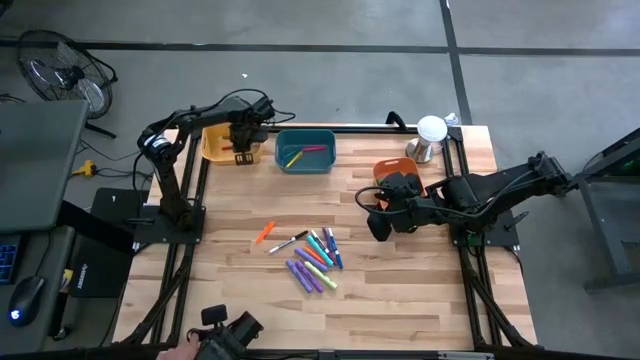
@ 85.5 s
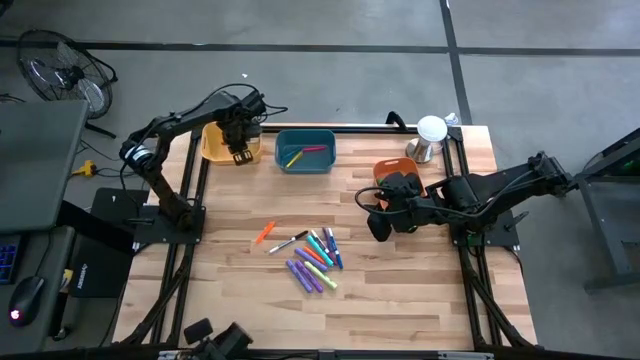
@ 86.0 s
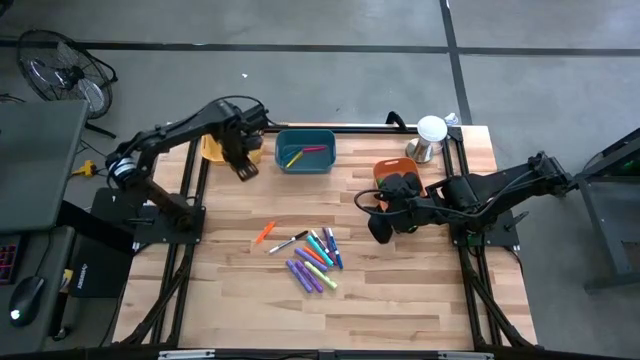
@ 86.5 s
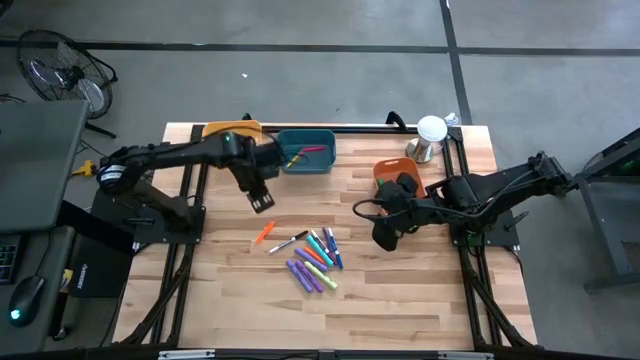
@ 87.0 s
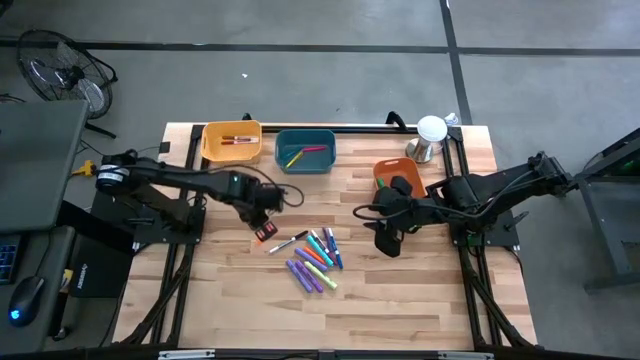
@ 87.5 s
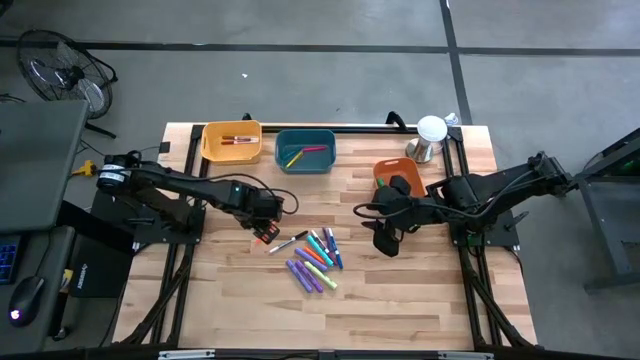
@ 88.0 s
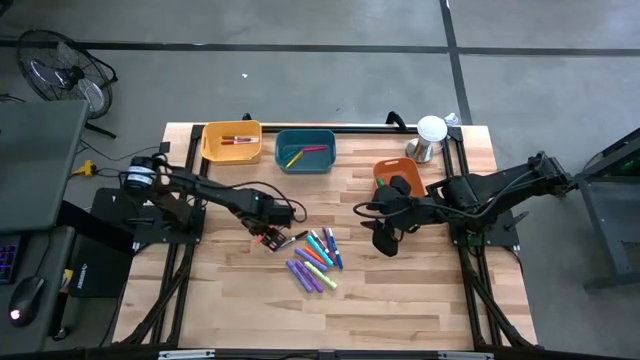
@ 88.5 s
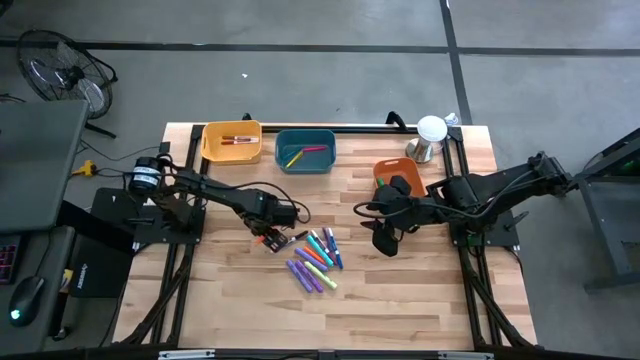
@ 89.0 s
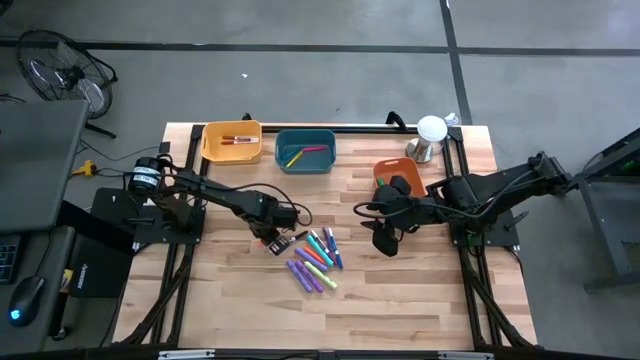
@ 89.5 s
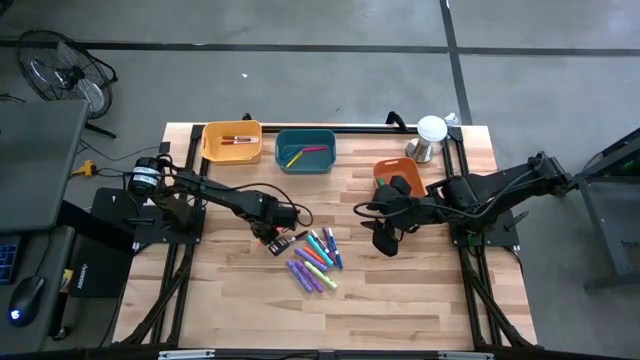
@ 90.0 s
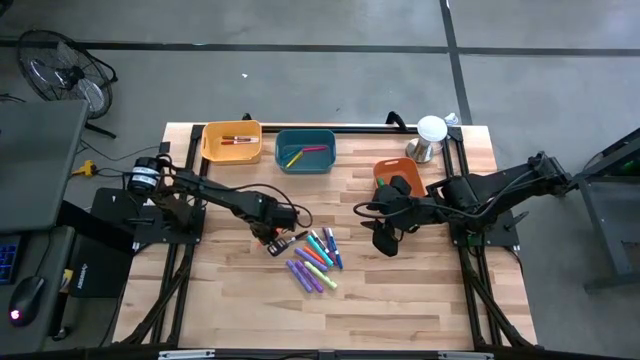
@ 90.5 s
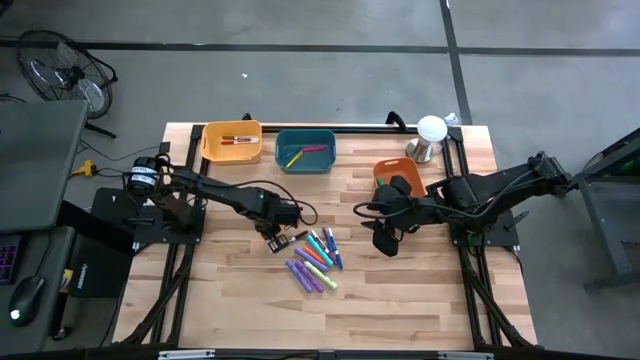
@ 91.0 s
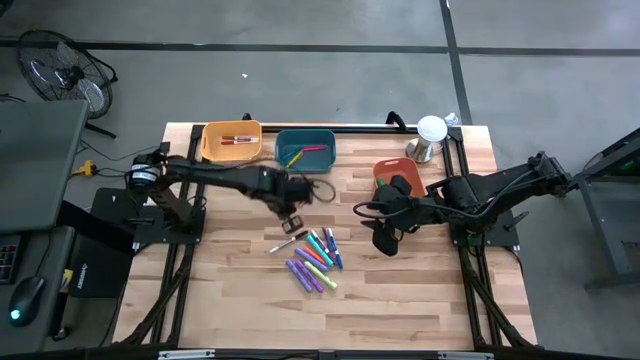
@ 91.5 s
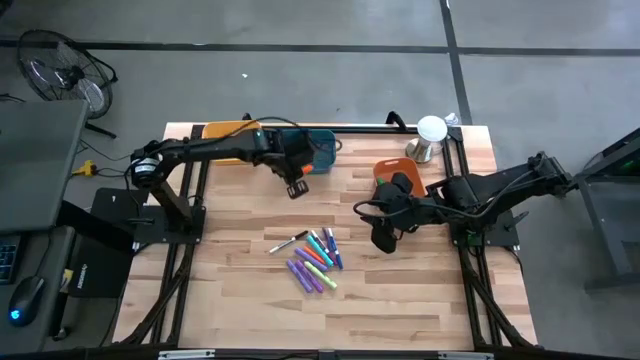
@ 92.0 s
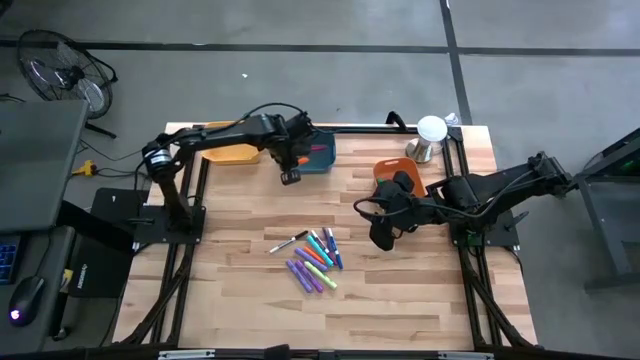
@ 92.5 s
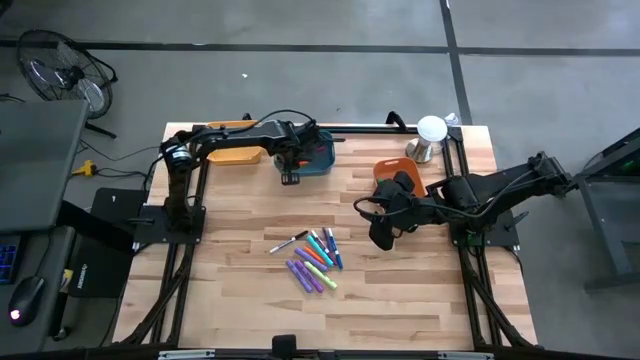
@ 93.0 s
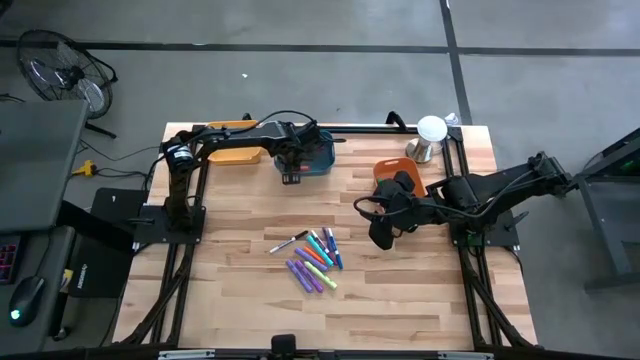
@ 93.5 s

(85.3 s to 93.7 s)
Task: Pick & Place Markers
Put the left orange pen into the blue bin

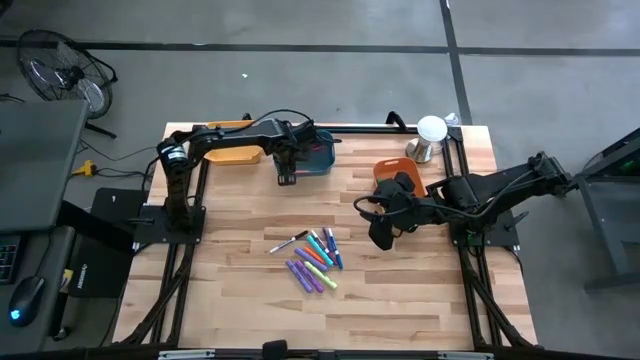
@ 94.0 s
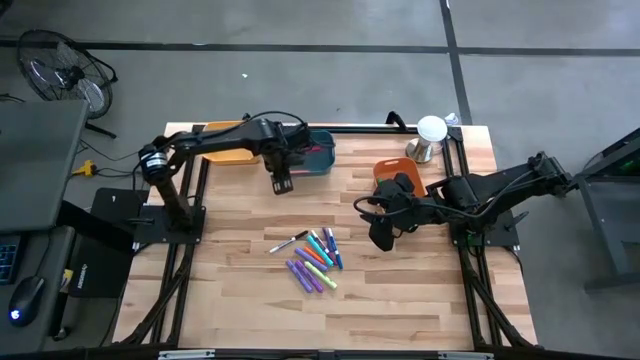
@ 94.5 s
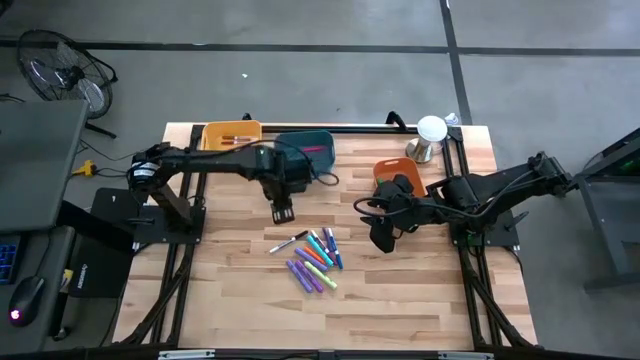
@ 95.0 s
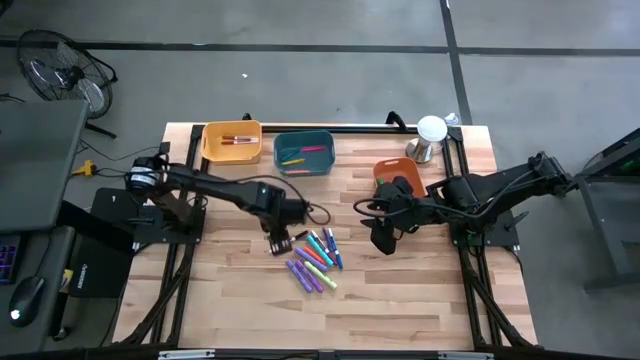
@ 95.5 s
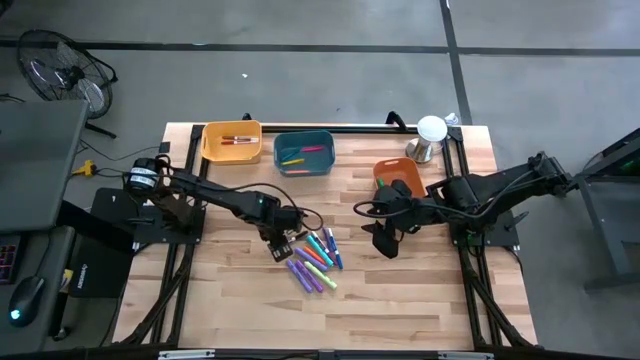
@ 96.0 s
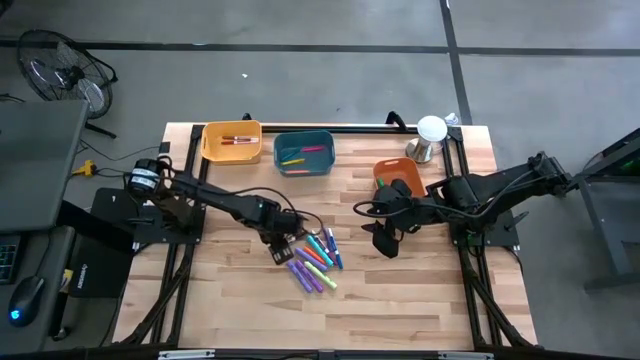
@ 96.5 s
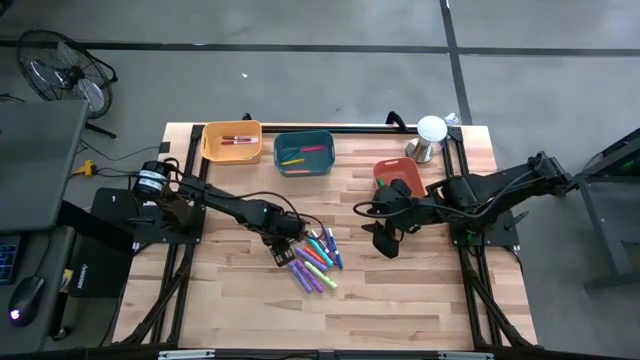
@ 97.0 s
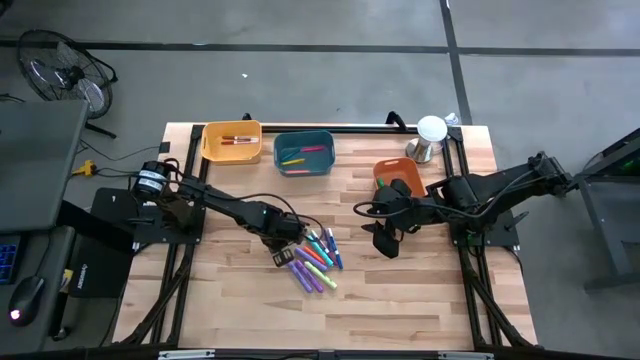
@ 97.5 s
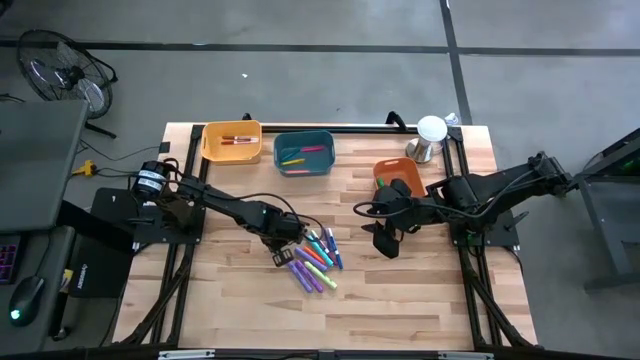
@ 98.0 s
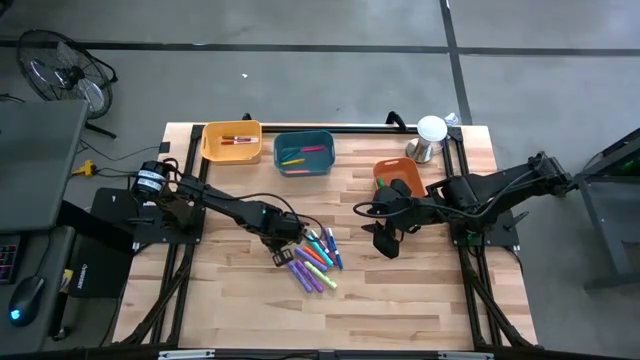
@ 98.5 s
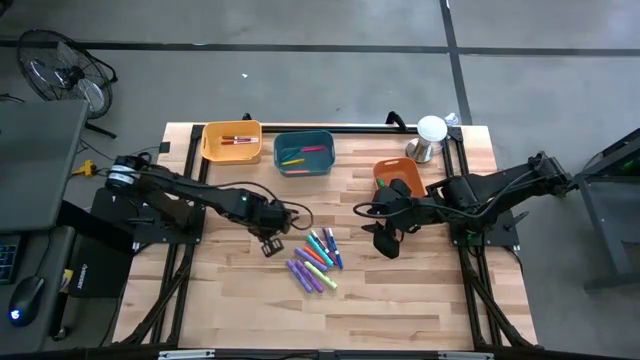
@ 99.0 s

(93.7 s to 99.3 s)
Put the black marker pen into the yellow bin

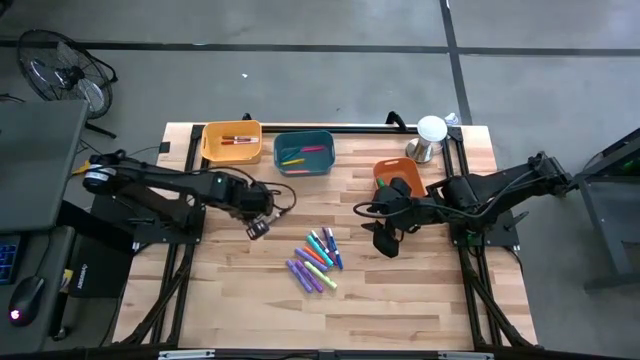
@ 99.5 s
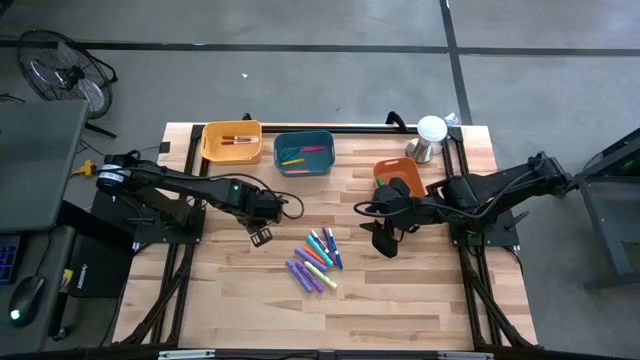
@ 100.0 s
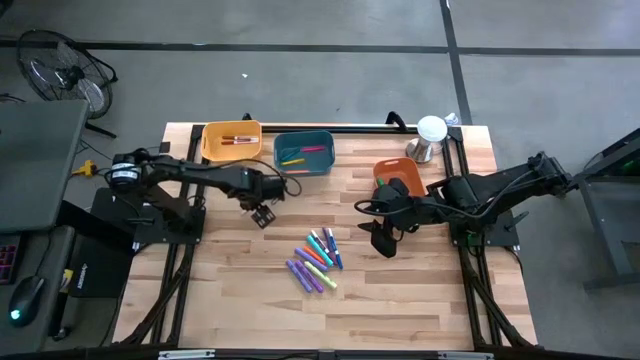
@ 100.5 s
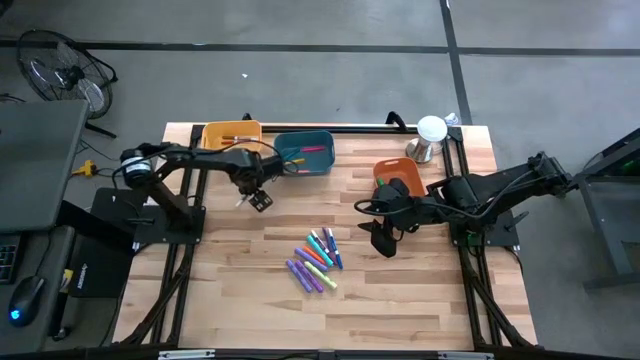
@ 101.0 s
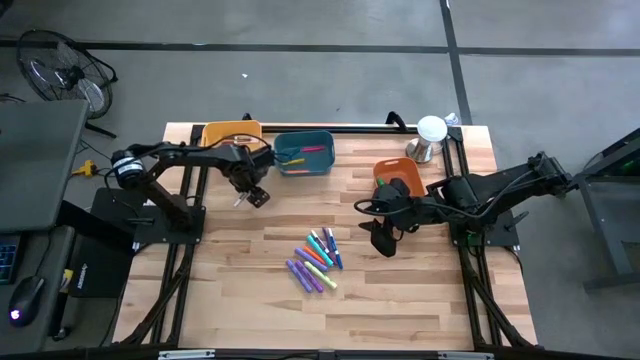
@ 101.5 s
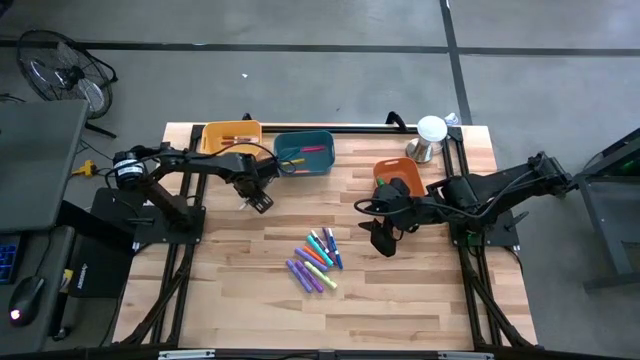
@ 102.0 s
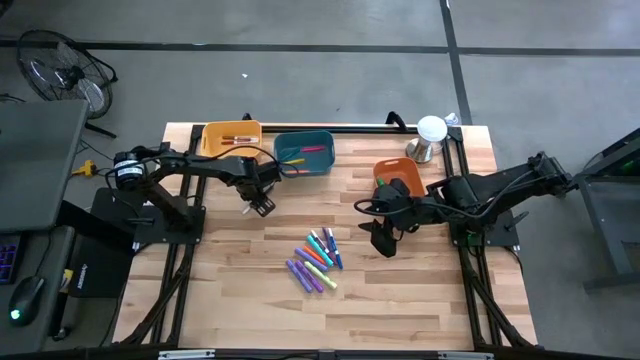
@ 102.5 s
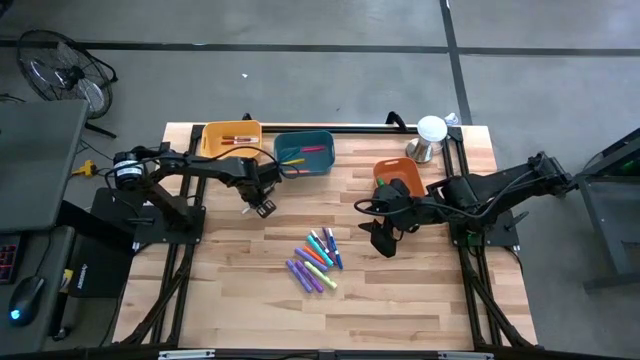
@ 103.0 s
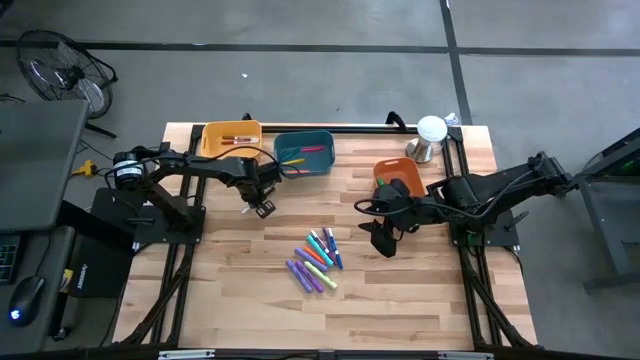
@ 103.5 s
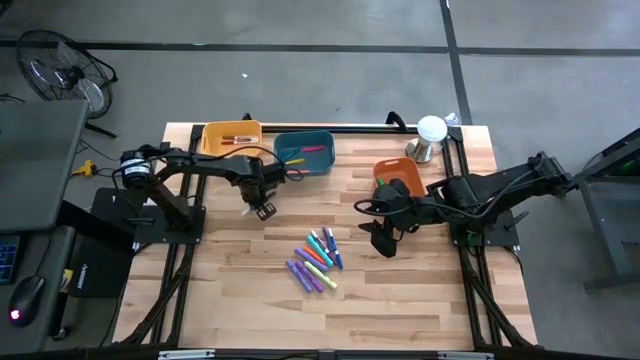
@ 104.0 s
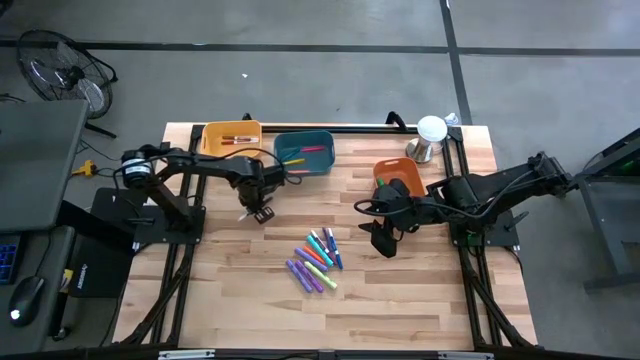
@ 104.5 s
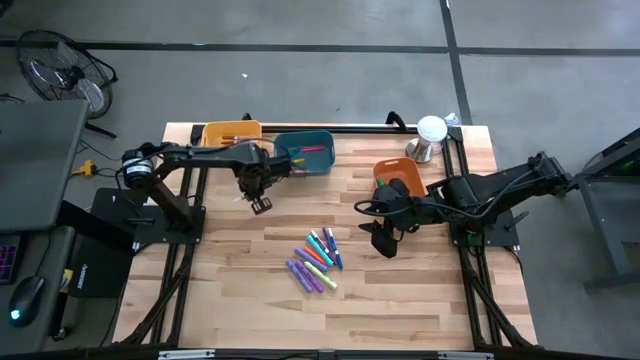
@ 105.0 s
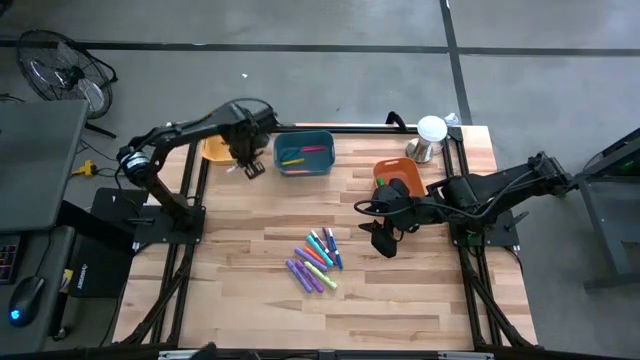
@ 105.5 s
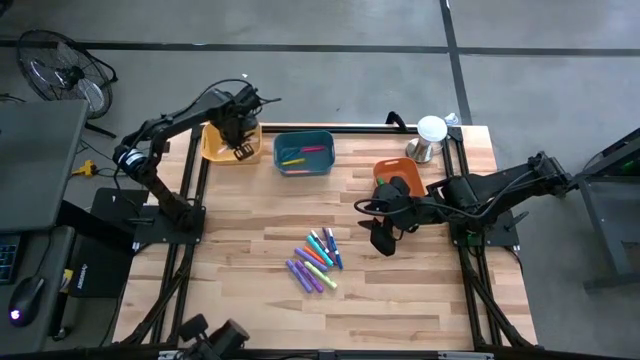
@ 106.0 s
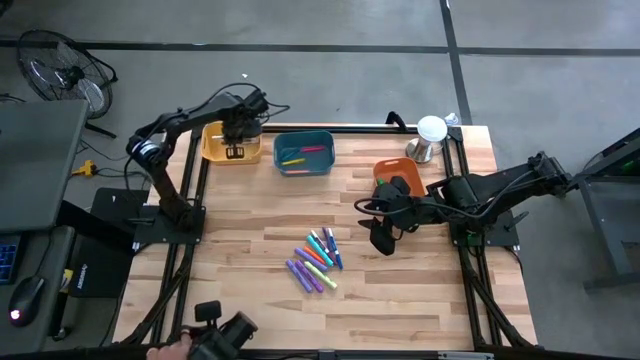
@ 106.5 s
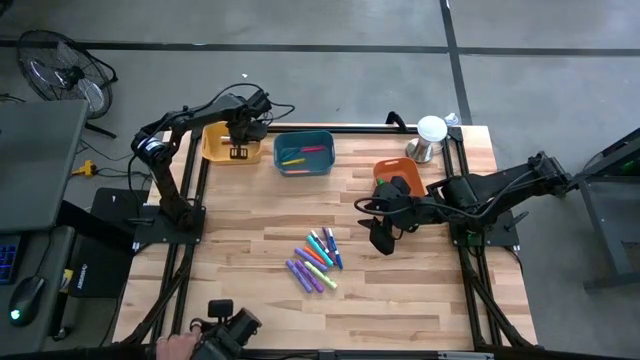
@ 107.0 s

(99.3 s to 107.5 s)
Put the black marker pen into the yellow bin
